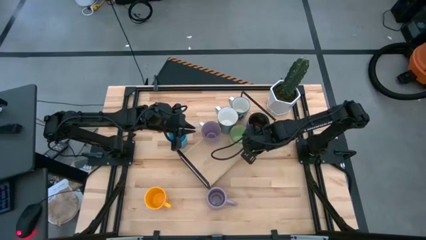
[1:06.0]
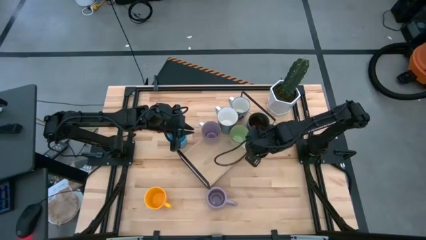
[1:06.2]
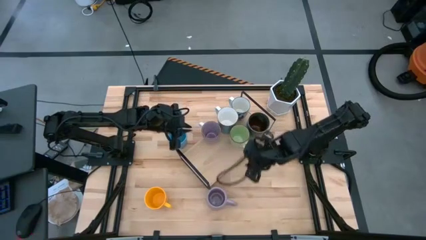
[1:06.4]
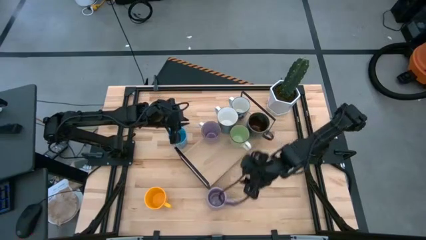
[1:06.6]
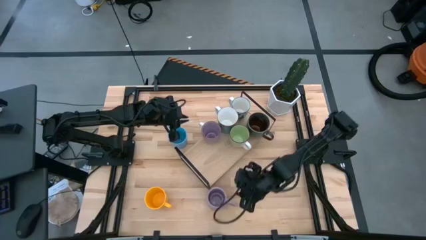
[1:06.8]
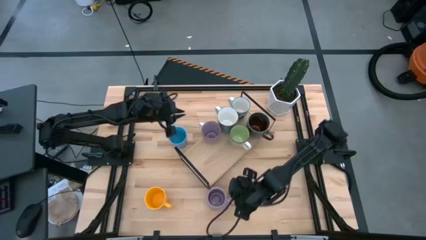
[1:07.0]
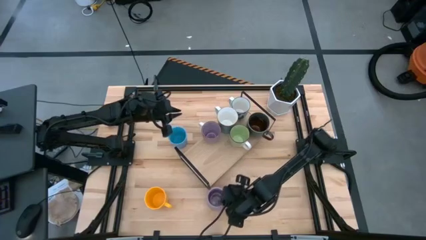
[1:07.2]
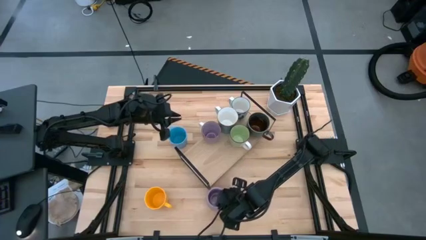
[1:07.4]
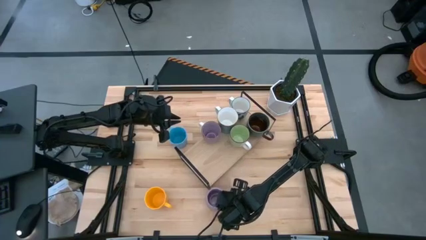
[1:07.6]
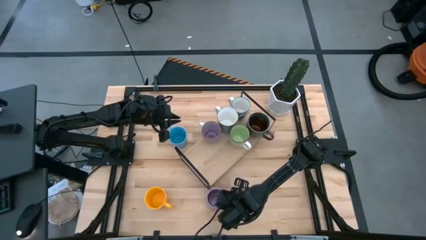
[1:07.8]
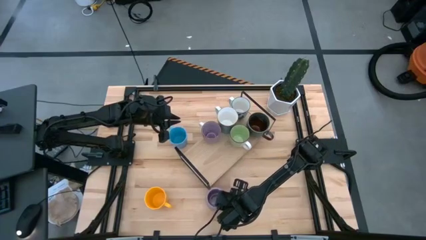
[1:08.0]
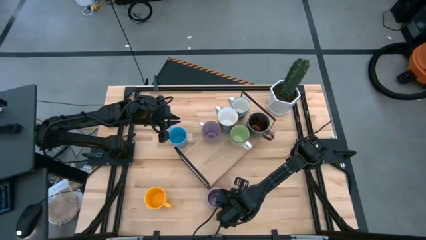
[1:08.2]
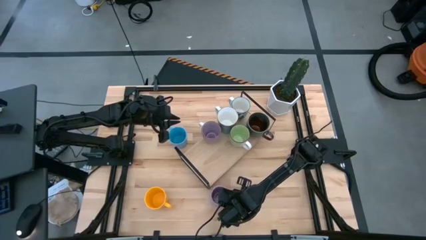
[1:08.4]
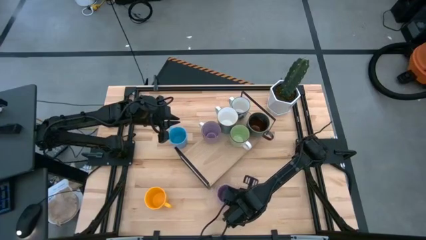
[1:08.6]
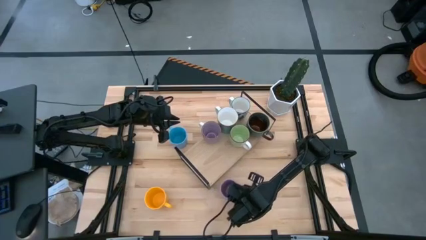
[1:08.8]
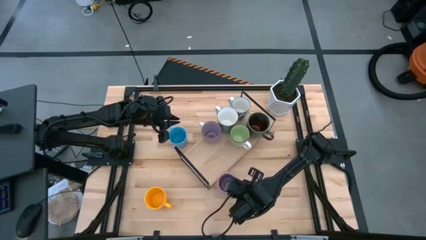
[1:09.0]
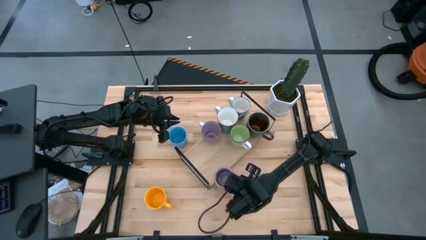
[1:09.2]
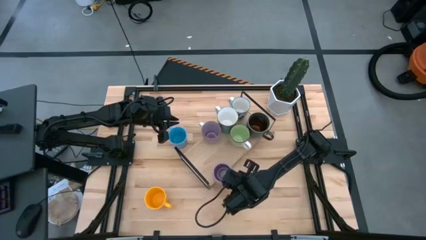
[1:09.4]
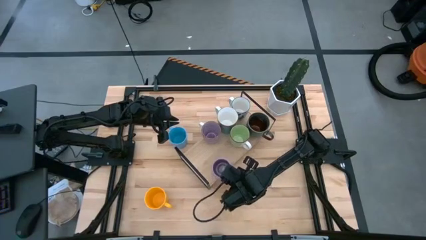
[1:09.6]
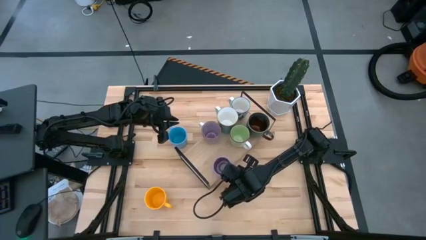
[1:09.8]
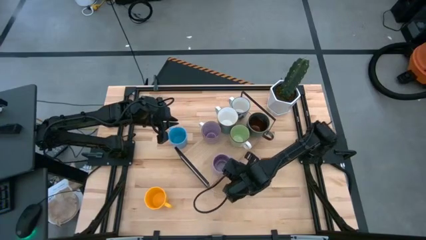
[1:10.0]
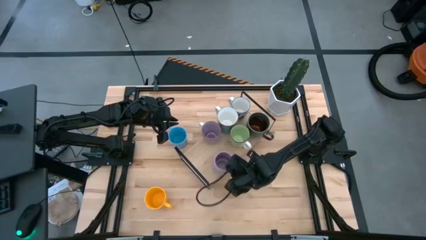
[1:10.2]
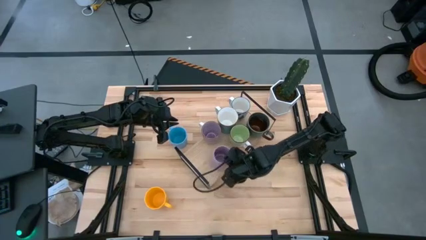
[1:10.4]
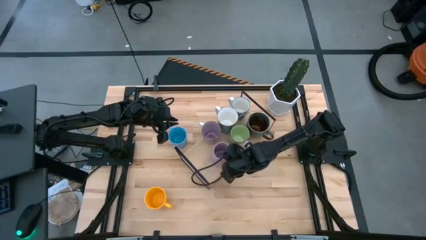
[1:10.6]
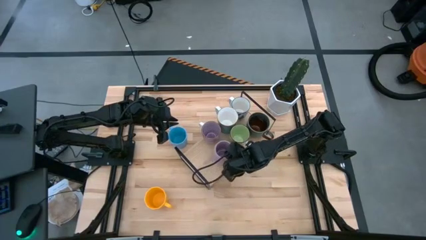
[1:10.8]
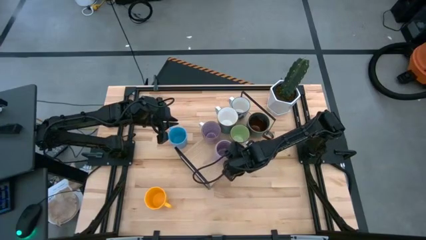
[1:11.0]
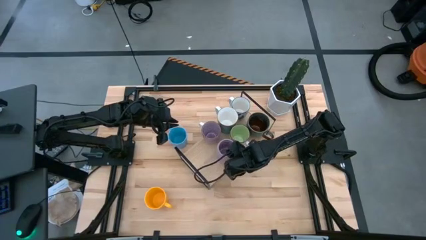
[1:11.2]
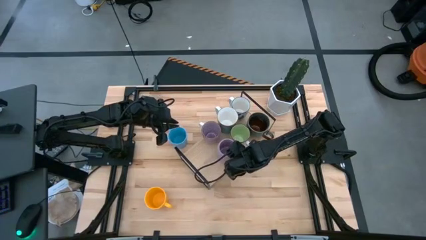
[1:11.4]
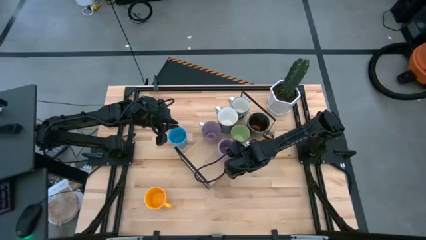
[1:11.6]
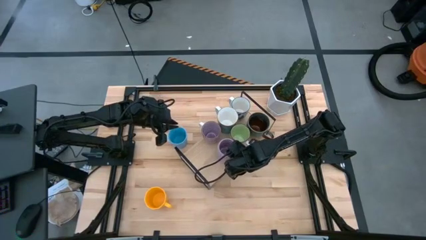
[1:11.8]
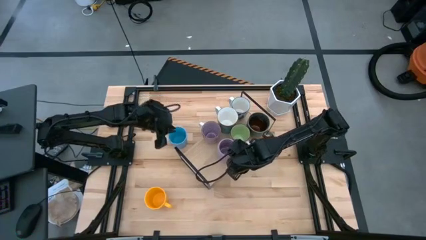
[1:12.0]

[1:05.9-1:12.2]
Task: Place coffee mugs
Put the purple mug on the shelf

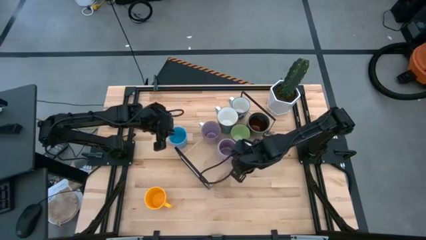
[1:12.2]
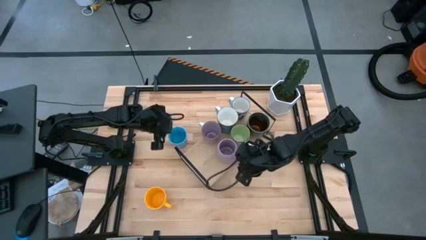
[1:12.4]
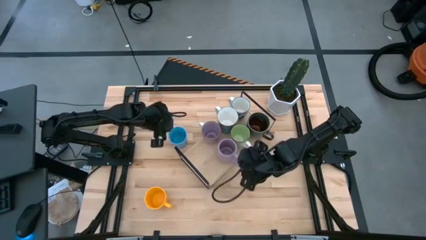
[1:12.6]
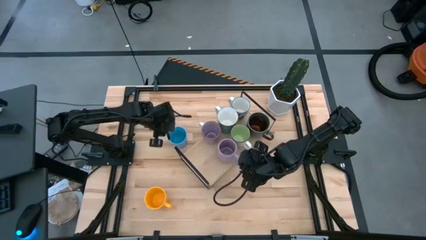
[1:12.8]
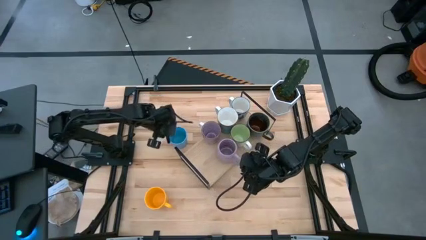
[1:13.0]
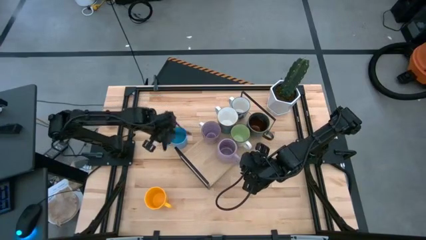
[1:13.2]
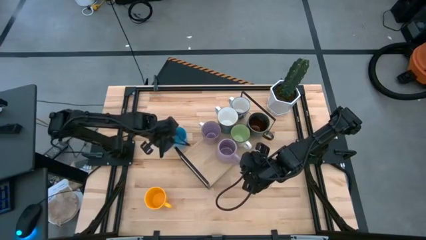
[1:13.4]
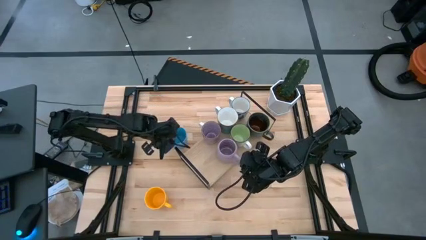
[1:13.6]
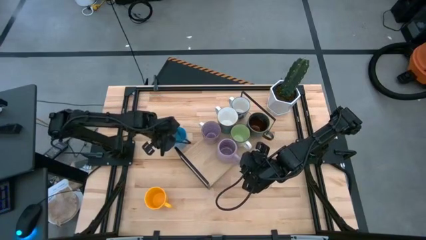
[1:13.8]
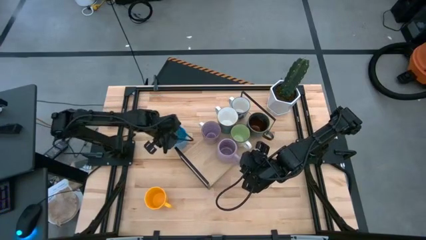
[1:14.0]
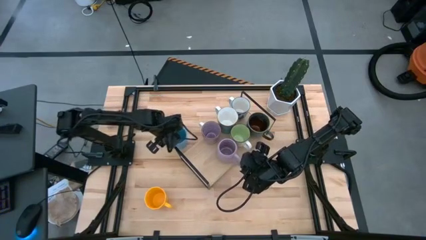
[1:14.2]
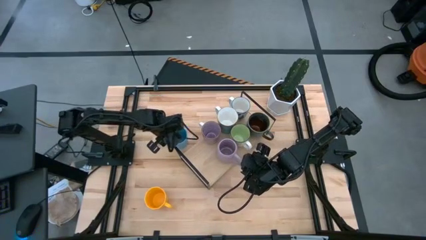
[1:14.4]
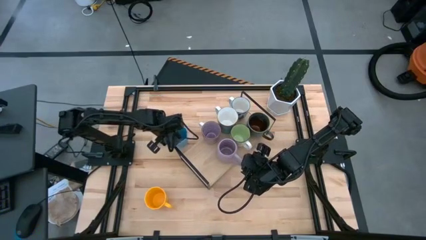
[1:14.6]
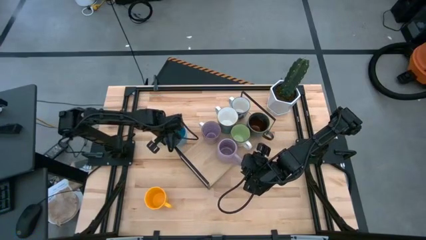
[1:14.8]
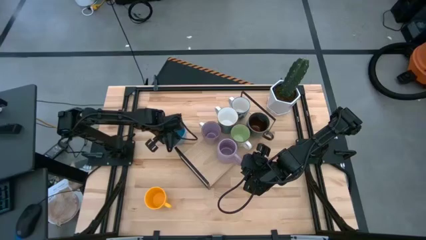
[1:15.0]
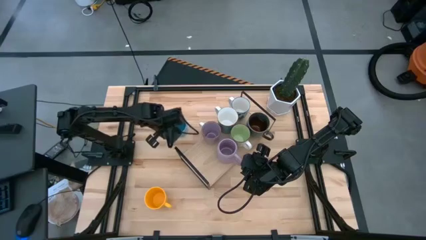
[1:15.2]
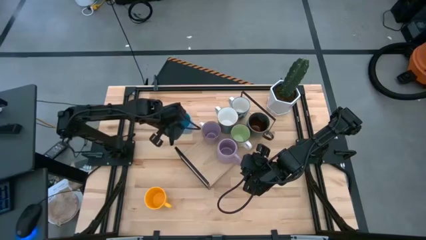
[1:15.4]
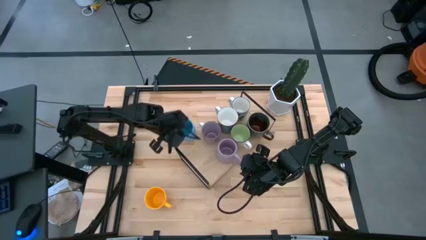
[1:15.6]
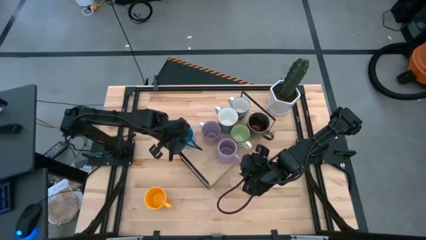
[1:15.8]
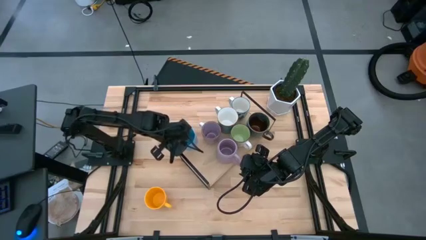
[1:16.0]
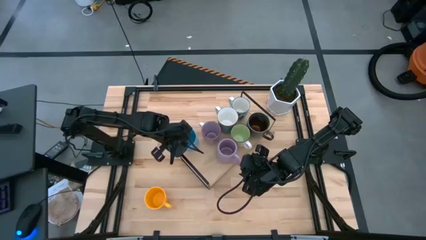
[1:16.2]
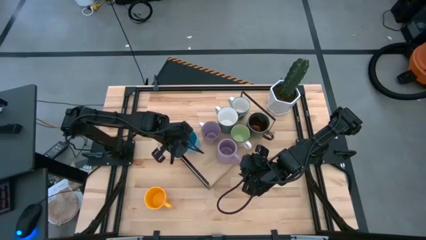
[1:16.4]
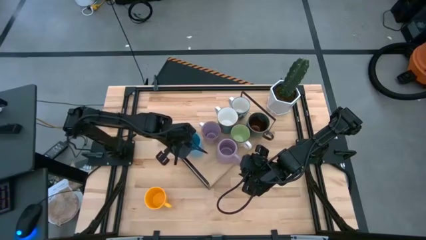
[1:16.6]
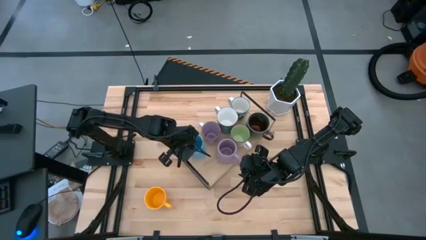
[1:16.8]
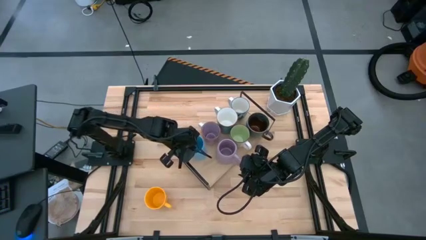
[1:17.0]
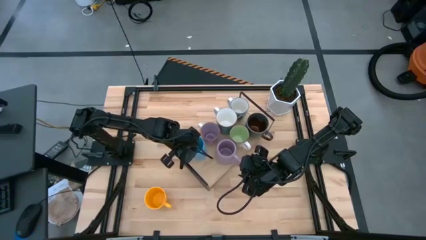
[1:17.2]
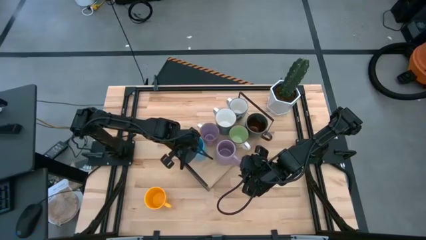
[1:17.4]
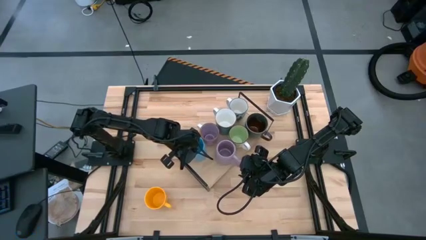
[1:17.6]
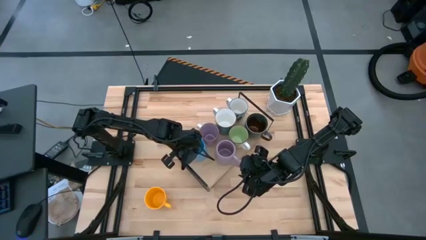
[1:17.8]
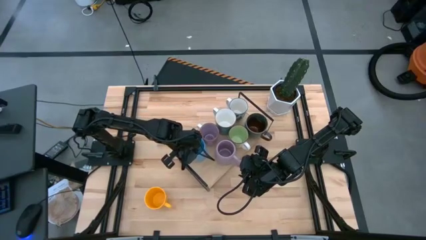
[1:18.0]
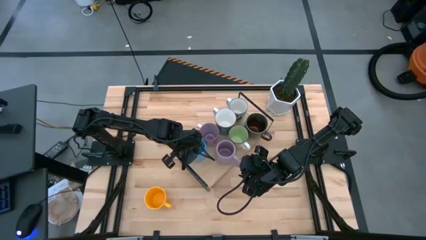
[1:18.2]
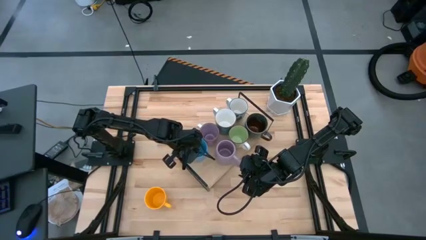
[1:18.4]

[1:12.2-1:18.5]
Put the blue mug on the shelf

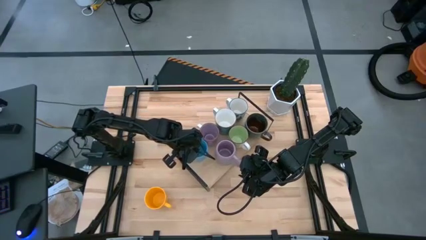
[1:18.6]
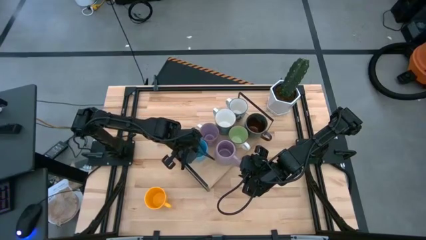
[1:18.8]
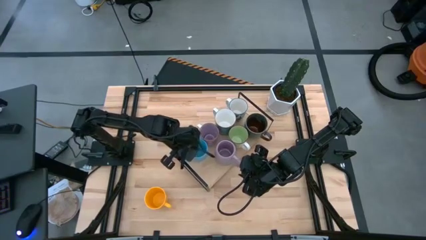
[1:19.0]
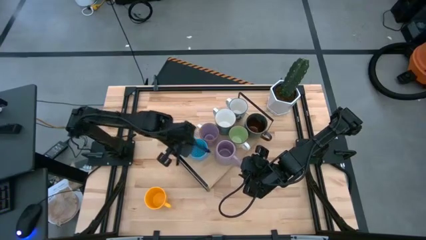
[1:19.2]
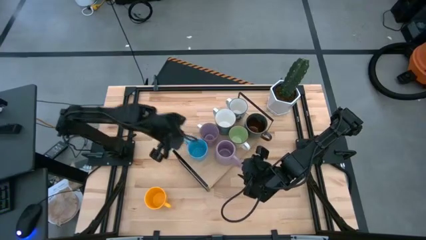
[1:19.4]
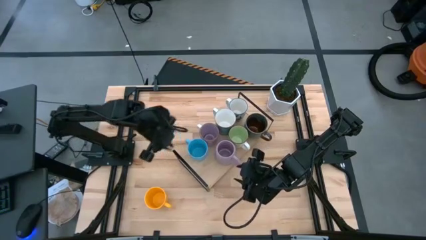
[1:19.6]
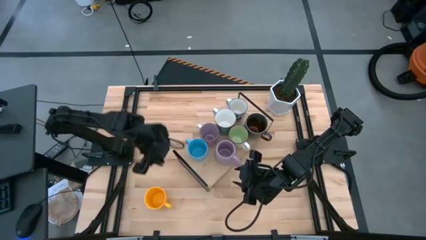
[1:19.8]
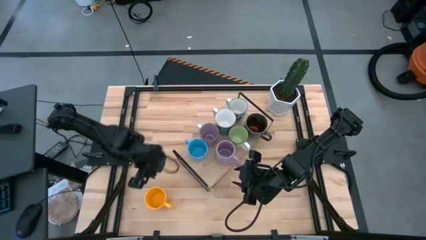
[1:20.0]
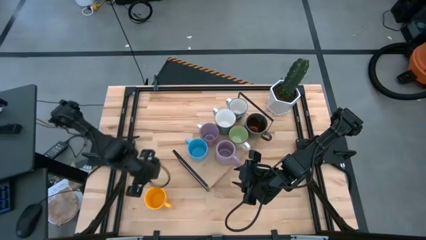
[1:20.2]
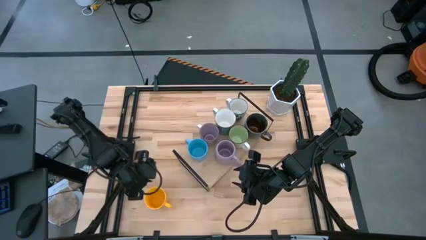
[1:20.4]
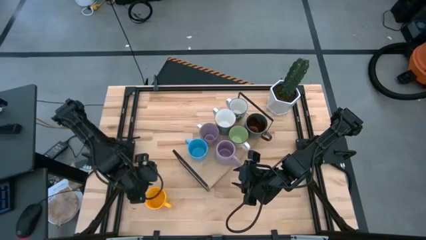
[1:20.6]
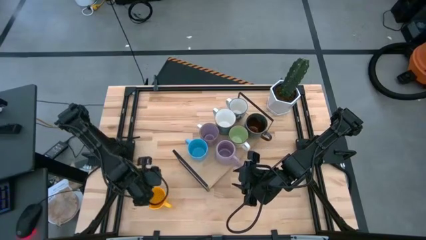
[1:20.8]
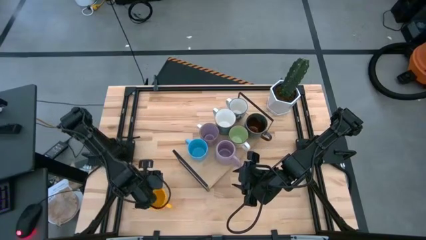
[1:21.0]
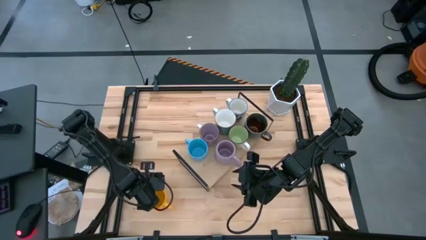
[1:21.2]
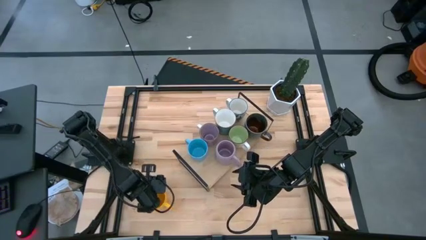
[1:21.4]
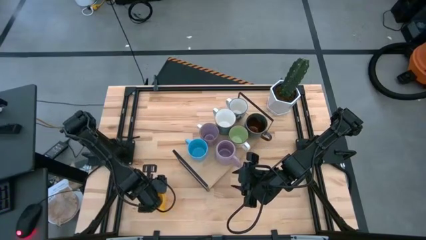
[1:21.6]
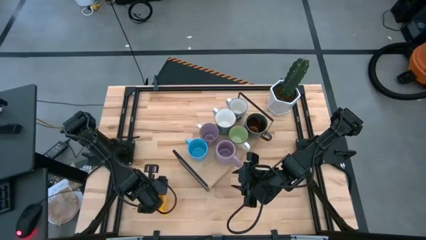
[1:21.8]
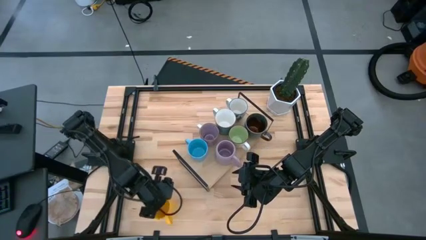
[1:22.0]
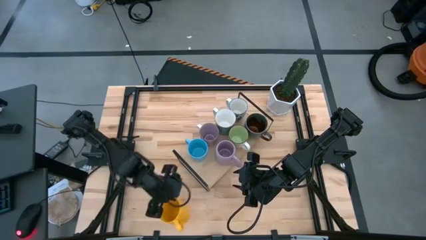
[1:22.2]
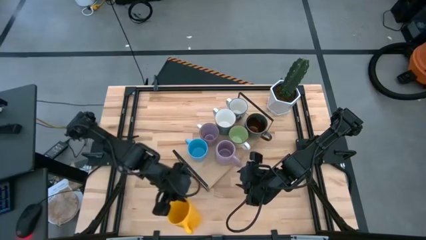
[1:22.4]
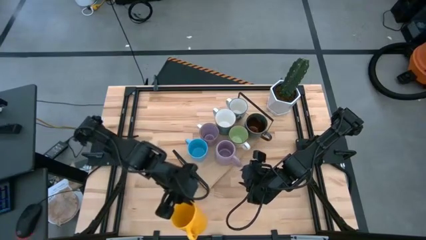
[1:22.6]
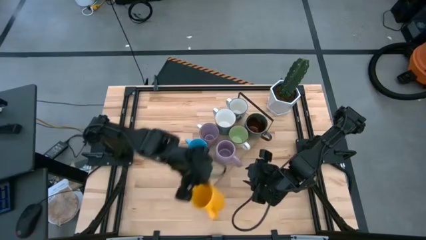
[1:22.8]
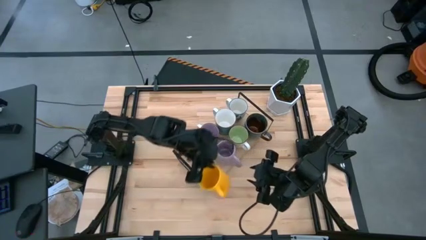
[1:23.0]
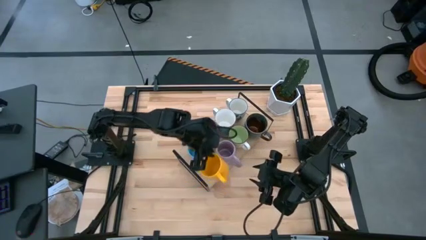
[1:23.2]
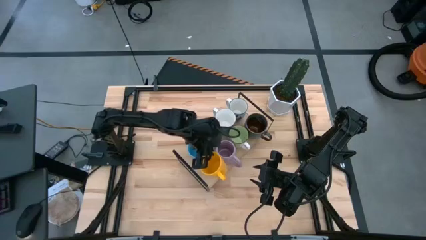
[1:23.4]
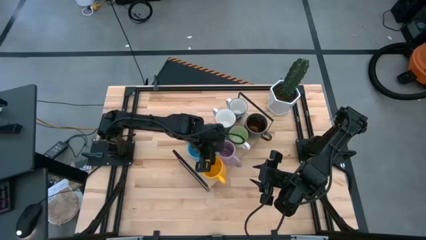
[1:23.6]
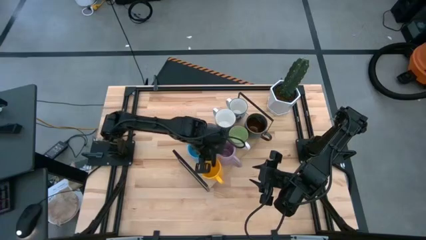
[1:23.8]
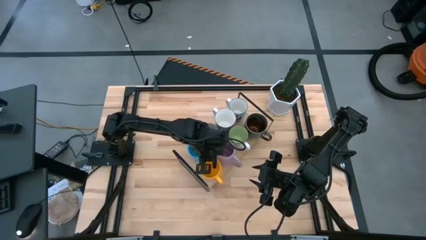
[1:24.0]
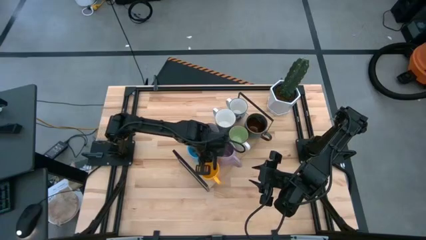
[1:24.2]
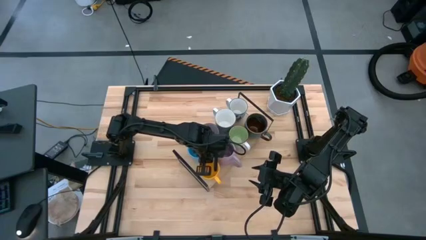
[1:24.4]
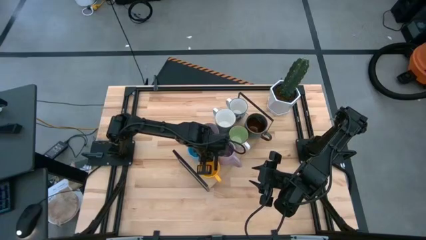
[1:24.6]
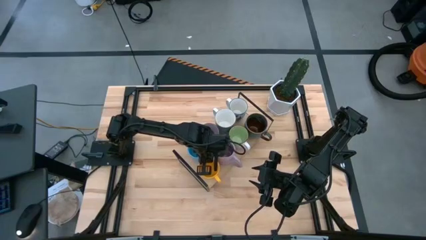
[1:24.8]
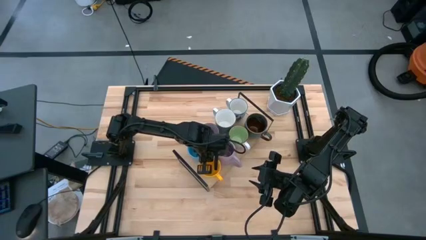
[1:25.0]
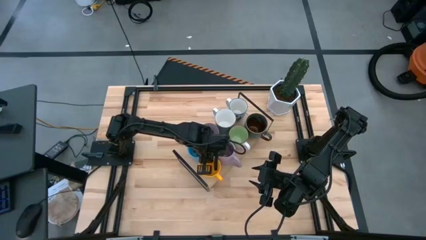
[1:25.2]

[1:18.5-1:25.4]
Put the yellow mug on the shelf
